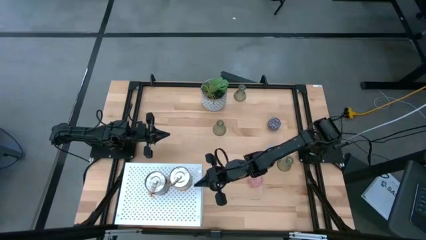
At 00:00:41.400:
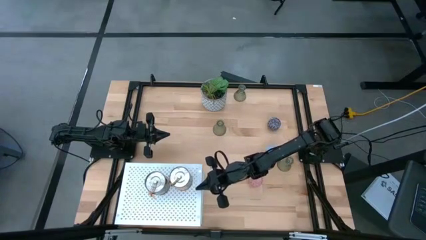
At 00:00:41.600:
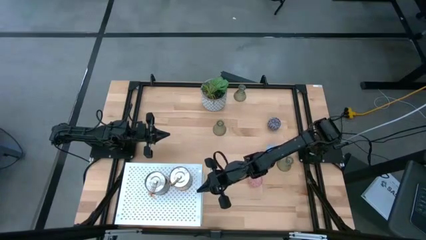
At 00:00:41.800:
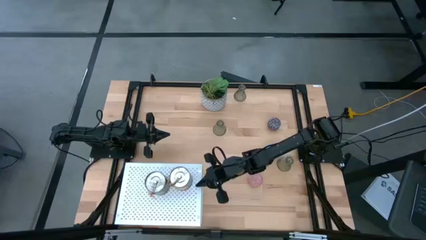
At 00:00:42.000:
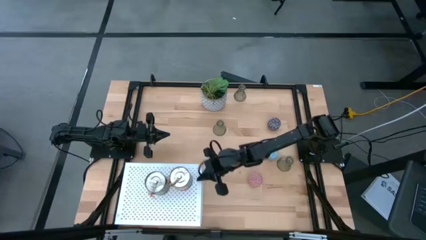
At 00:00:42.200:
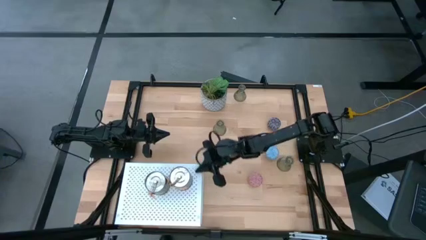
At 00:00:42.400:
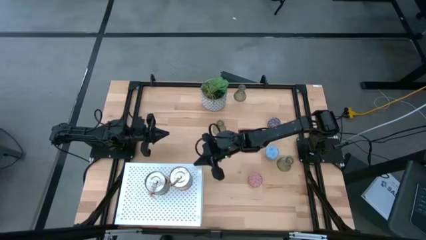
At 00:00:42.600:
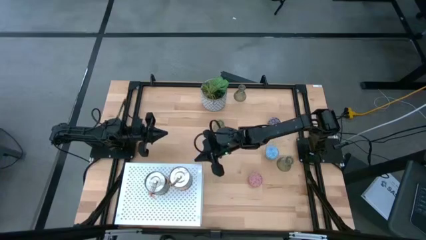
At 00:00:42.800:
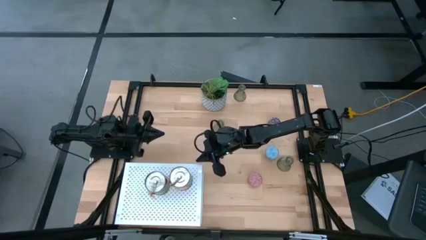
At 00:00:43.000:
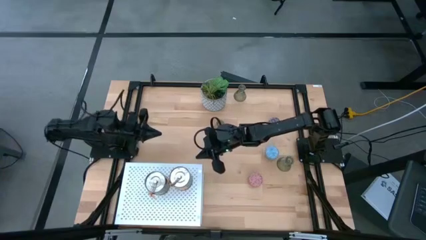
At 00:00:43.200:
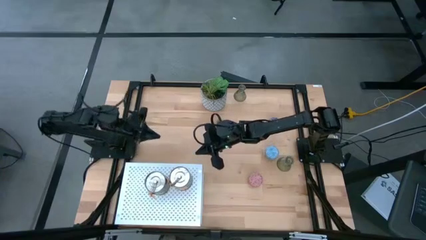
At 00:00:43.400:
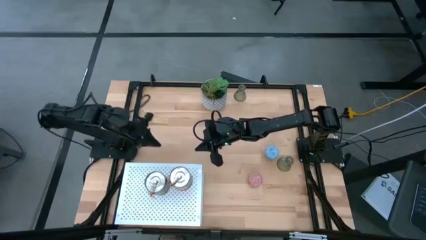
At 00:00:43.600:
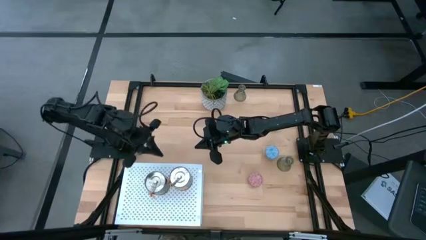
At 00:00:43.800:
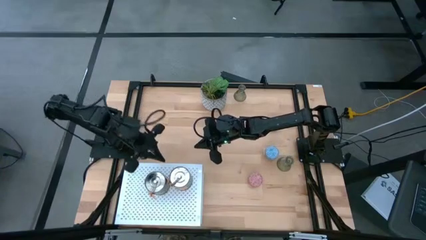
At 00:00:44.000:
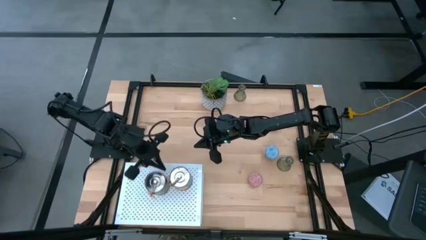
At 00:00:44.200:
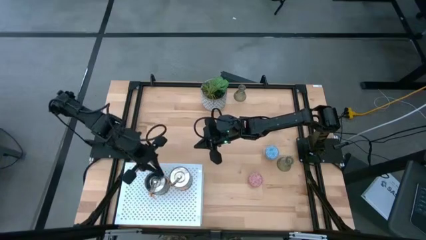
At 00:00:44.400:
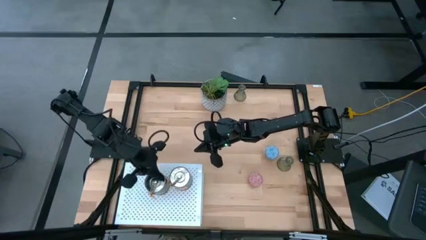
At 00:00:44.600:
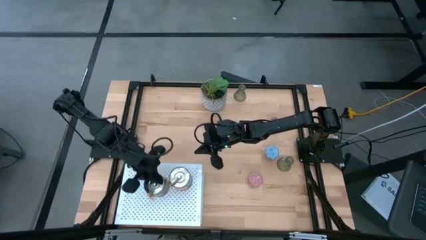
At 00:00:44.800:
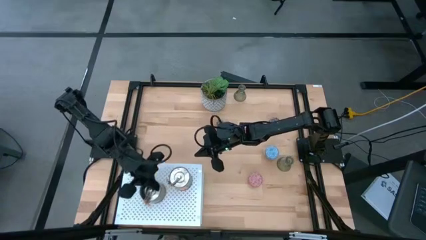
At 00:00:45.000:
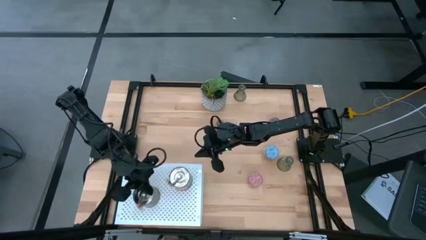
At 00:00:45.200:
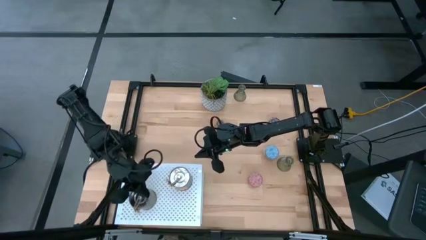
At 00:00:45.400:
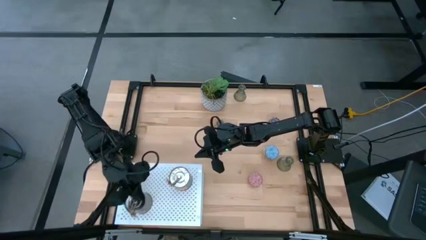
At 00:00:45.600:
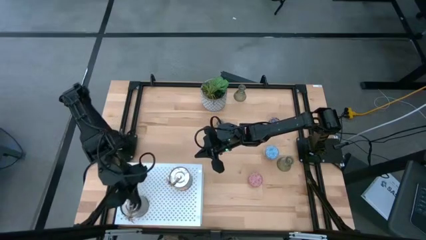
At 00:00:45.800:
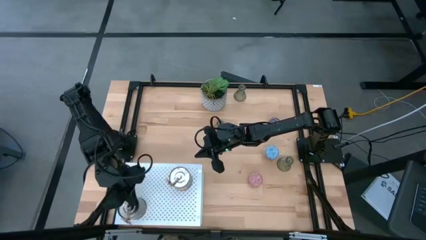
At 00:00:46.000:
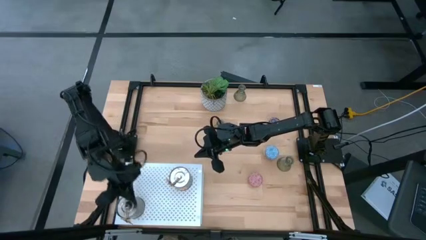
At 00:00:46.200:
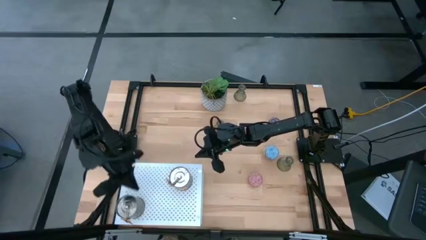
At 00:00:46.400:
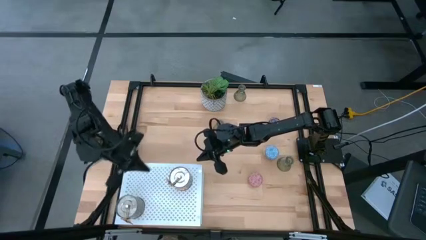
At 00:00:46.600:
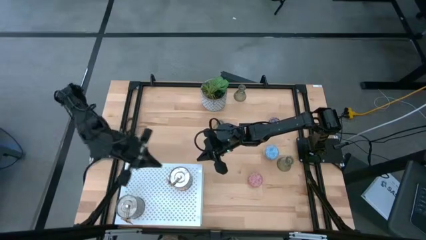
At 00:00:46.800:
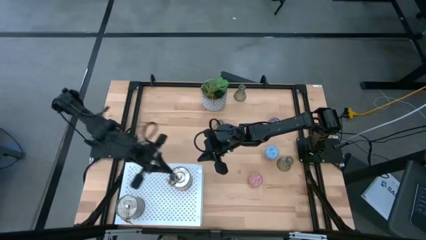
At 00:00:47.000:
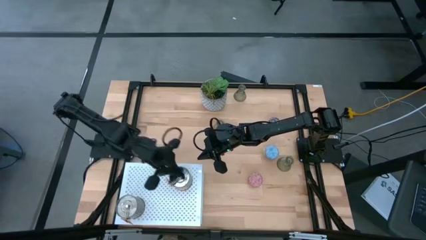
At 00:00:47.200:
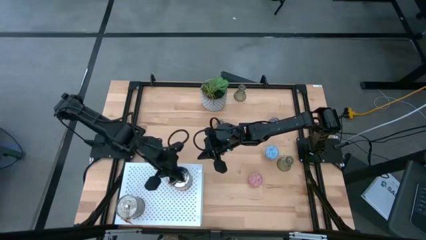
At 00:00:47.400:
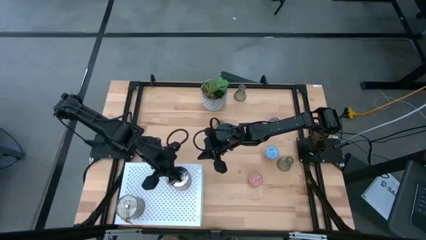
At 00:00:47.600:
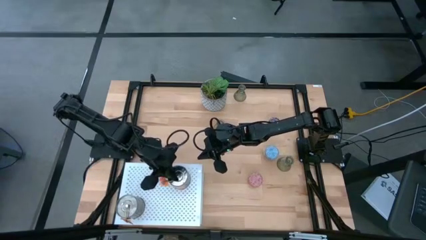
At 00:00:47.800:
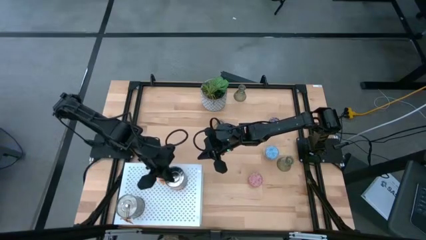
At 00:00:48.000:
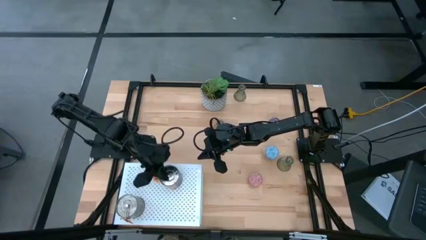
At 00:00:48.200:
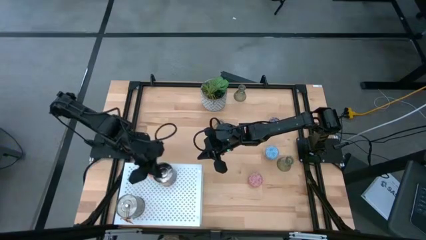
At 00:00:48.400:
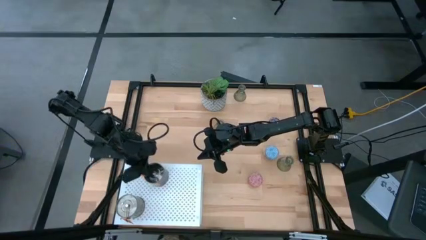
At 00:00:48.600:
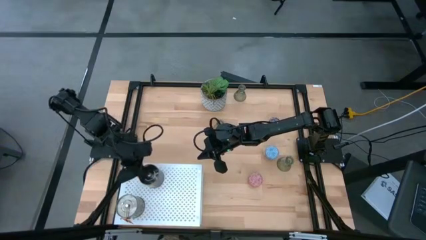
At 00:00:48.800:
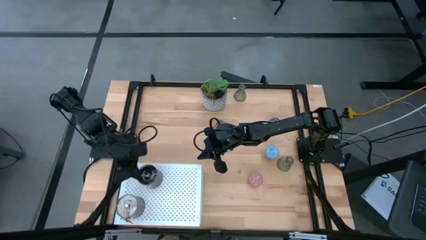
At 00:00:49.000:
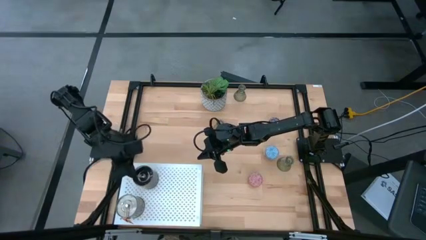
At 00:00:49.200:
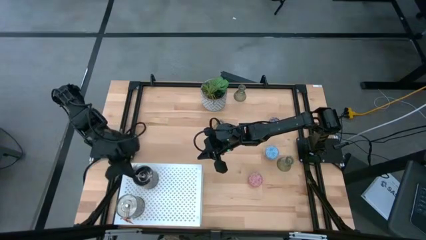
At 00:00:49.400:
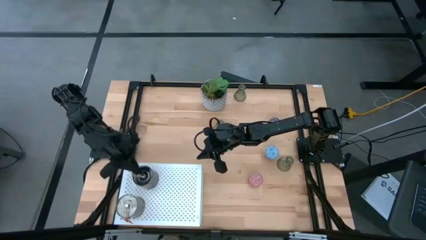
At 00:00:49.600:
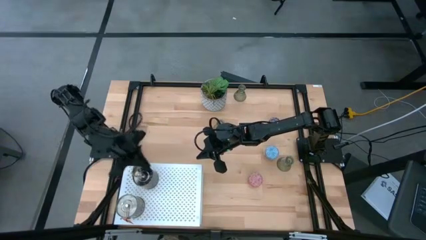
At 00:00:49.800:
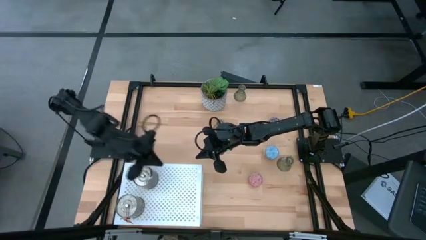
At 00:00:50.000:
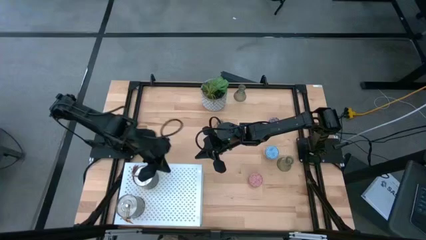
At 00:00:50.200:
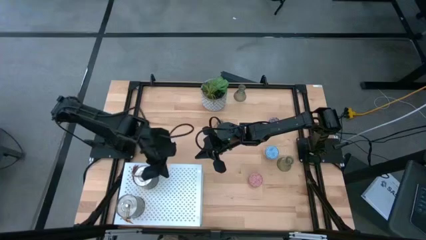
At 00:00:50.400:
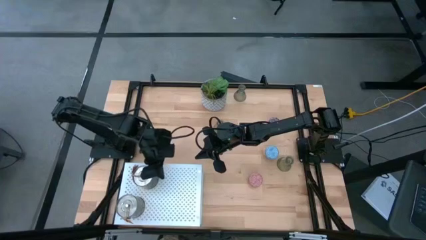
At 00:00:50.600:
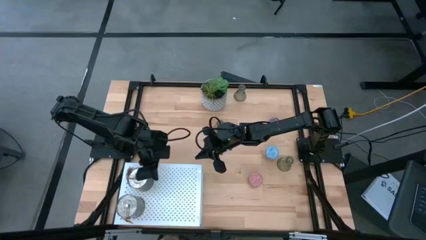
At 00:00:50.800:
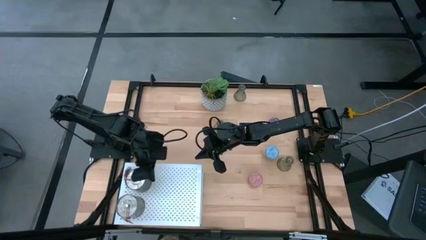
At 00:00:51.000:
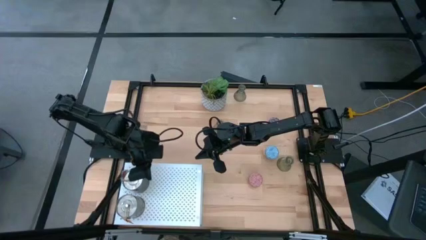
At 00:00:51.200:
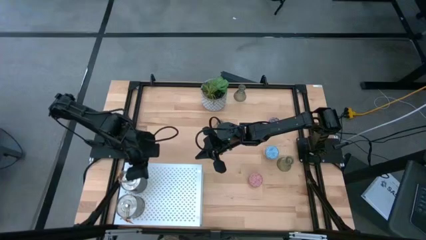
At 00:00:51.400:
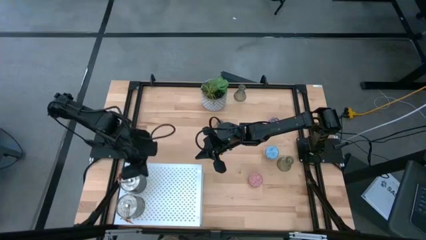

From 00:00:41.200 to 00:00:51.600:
Task: Pick & Place candle stick holders
Adjust the silver scented candles on the shelf

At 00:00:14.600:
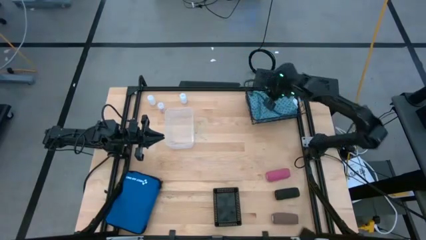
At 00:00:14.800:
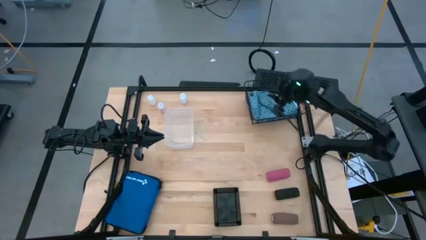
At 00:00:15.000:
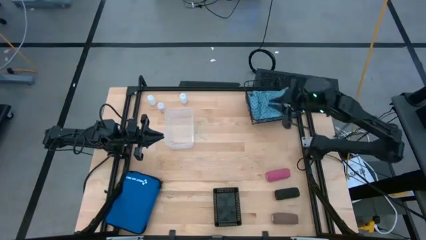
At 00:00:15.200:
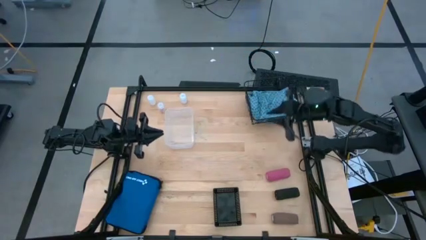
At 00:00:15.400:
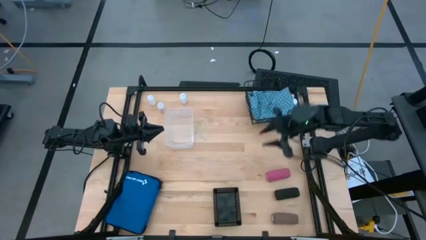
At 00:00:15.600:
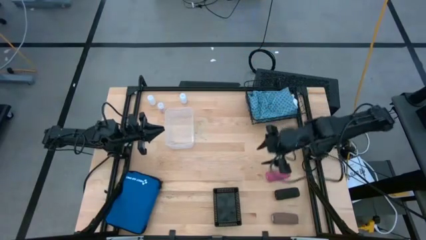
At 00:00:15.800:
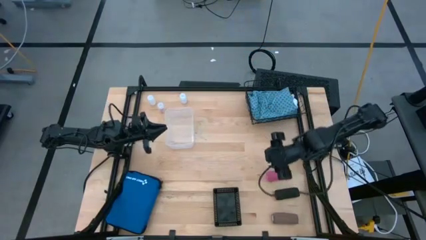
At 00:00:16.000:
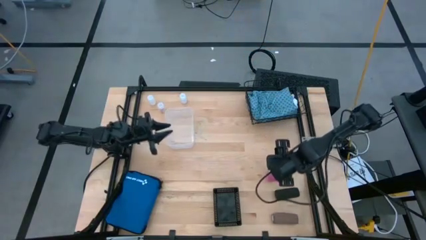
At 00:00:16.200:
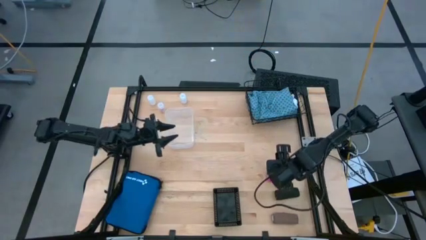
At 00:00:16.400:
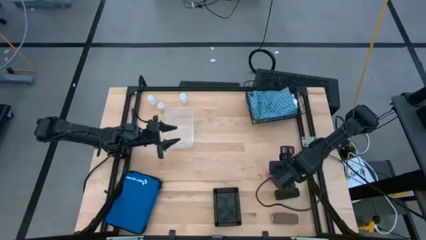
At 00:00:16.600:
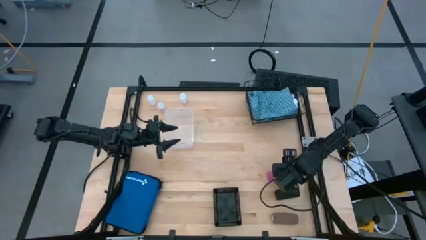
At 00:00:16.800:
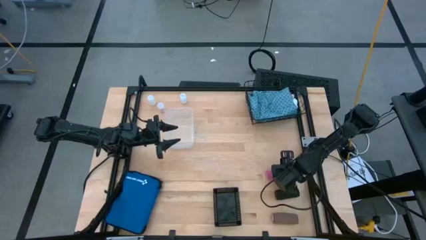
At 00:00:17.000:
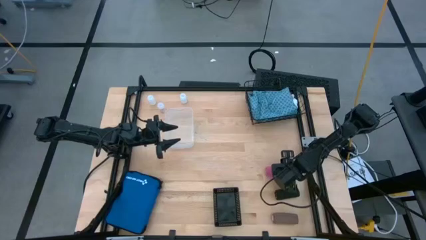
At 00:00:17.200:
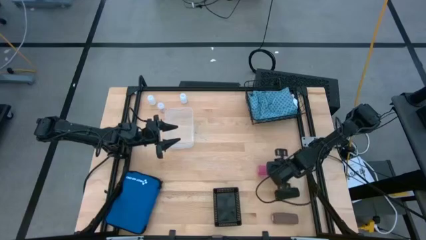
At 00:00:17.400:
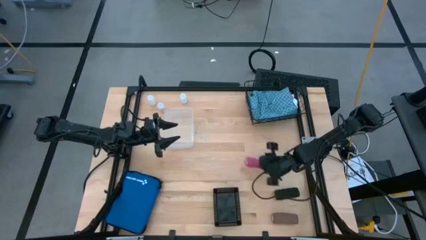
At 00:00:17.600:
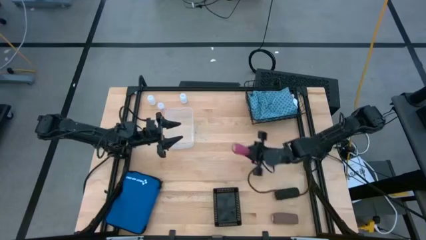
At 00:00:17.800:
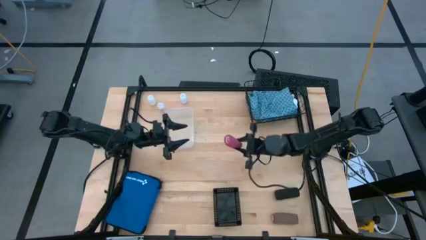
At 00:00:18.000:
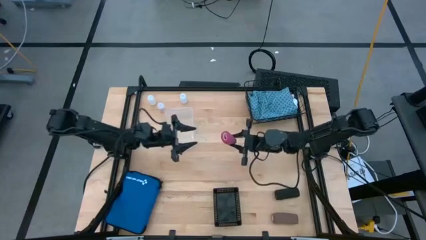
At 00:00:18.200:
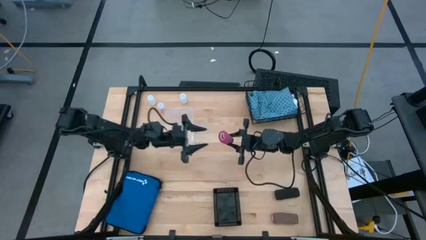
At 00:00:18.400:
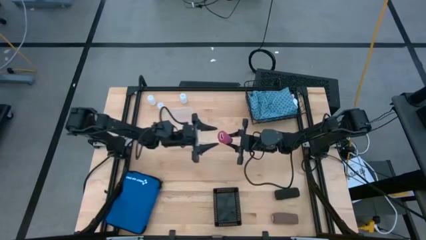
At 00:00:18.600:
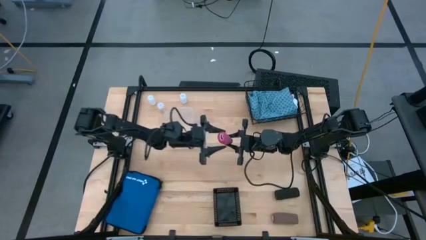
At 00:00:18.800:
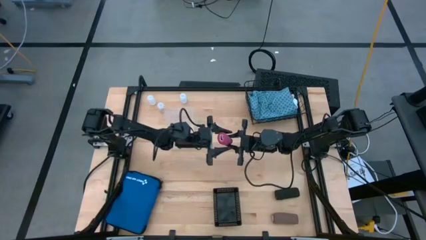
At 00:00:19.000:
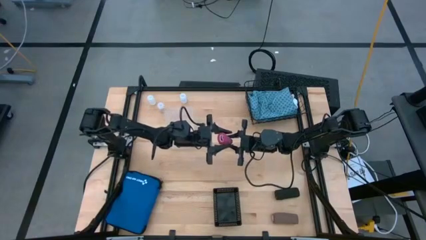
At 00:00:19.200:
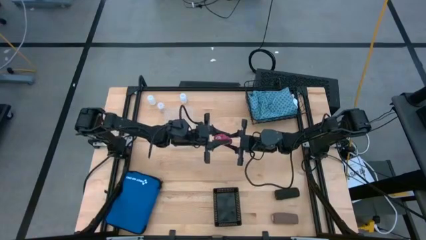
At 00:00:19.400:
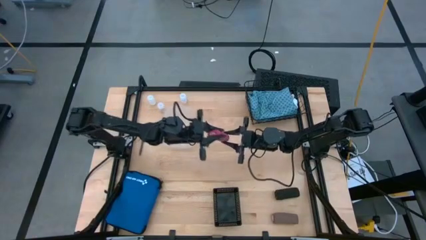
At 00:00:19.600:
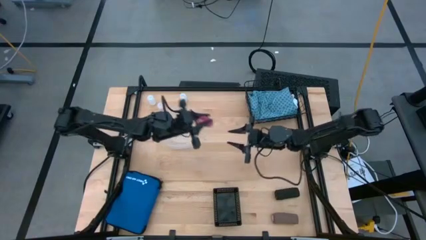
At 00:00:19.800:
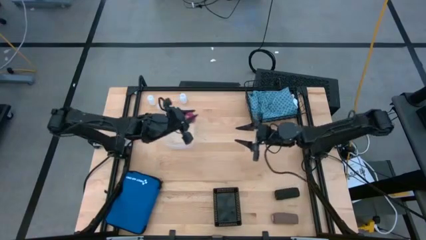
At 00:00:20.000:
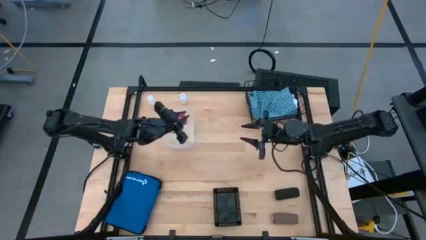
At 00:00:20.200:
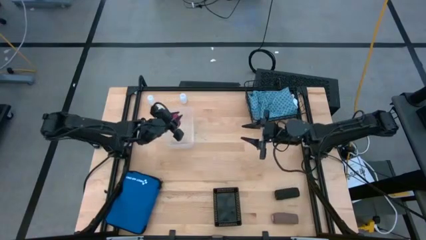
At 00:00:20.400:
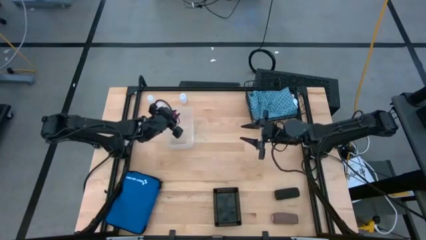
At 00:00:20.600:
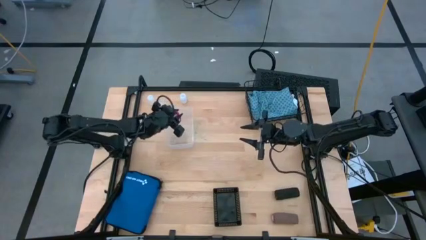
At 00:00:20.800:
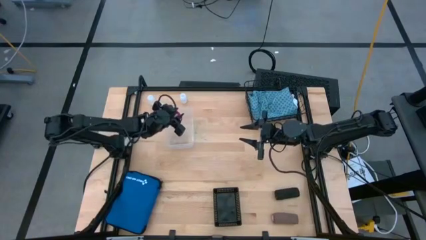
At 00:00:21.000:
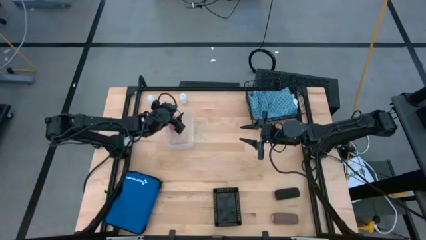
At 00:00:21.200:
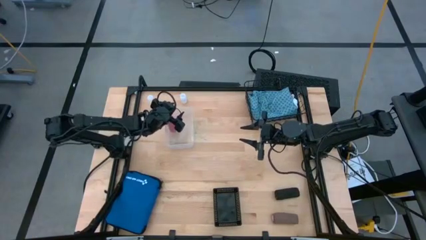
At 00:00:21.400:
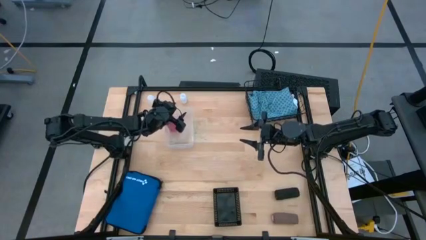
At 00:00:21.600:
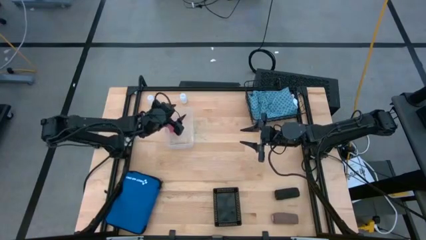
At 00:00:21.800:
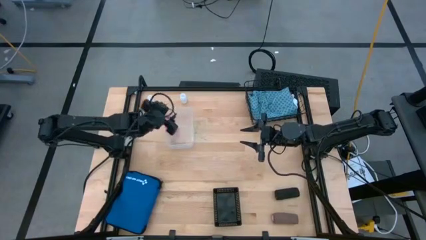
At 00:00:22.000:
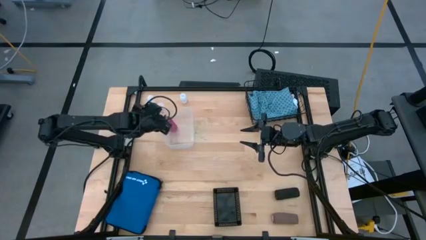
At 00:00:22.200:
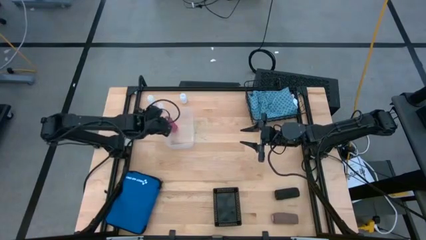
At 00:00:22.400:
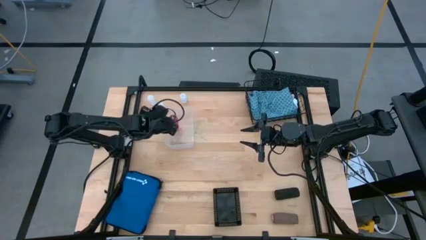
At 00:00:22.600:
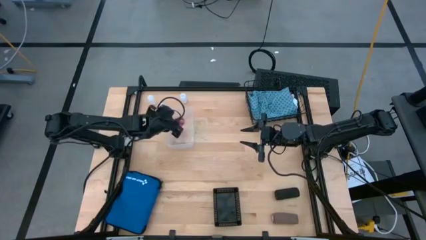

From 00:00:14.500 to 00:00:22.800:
Task: Pick & Place Medicine items
Put the pink bandage into the transparent bin
